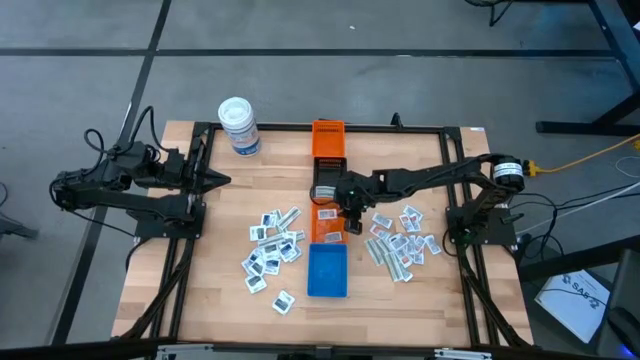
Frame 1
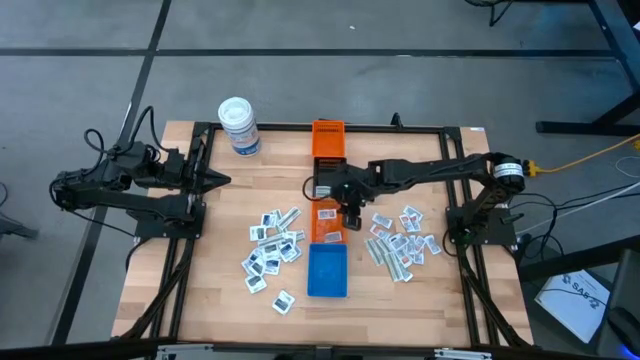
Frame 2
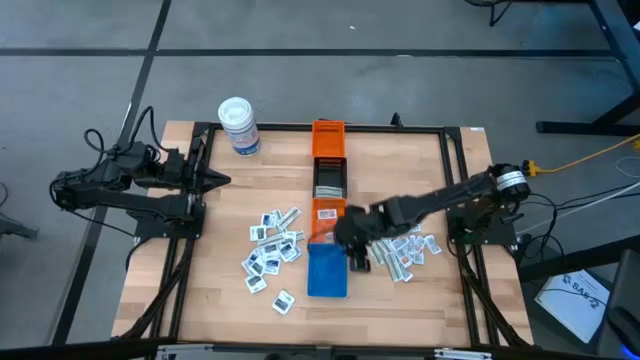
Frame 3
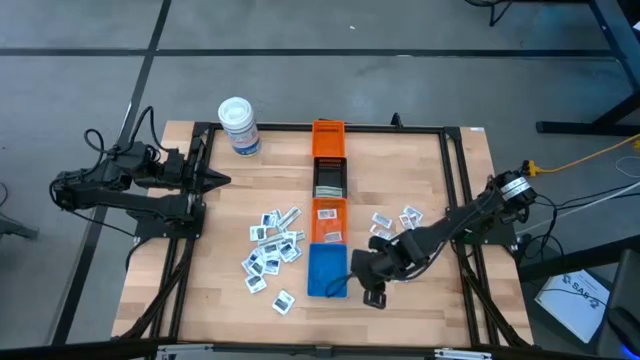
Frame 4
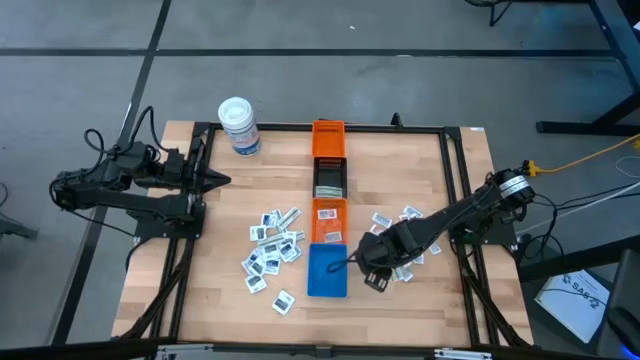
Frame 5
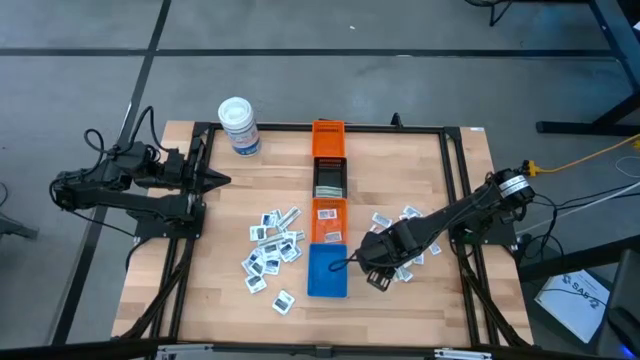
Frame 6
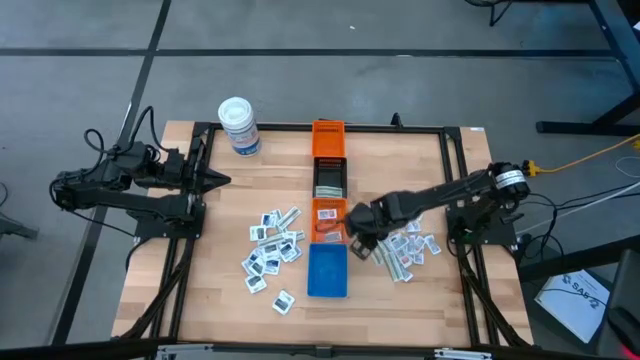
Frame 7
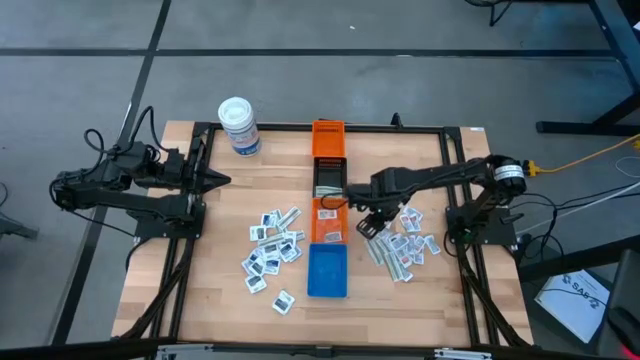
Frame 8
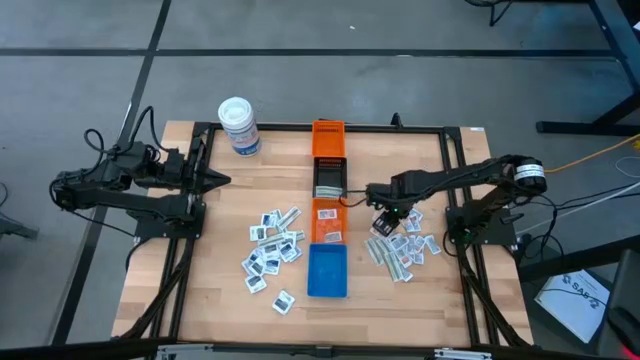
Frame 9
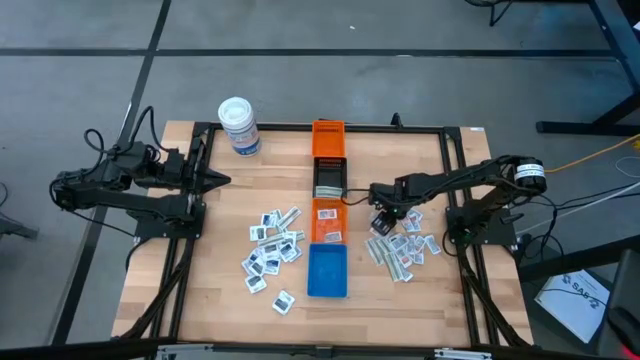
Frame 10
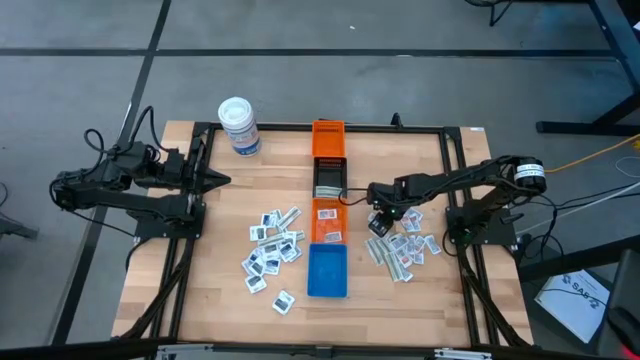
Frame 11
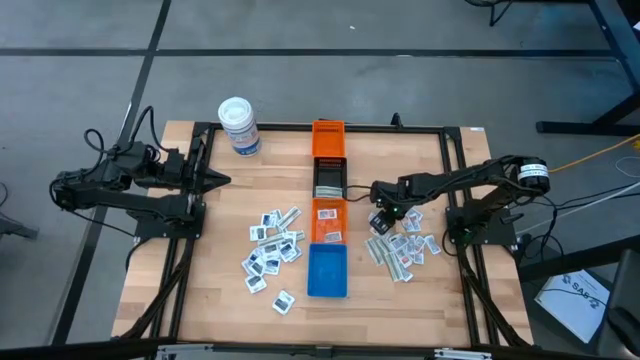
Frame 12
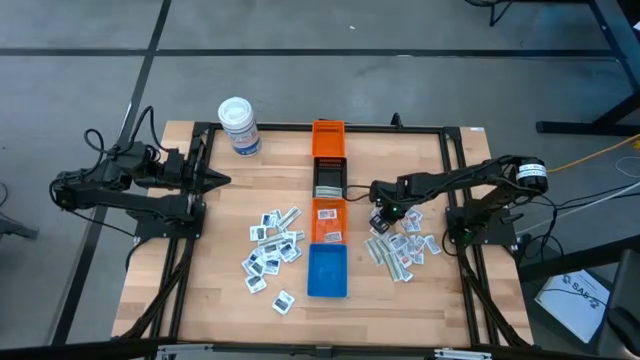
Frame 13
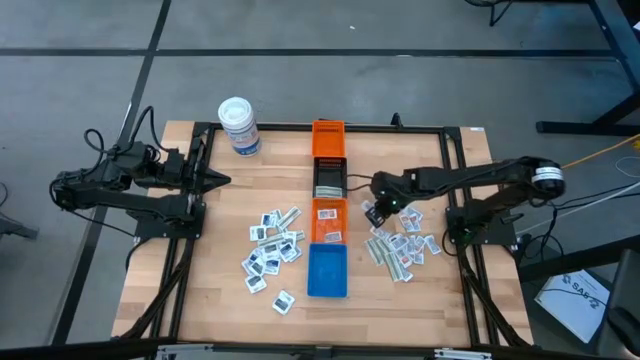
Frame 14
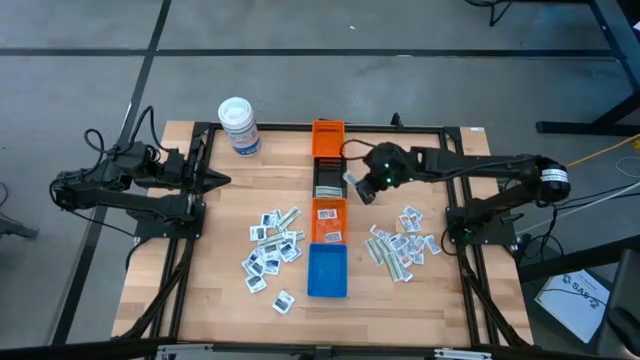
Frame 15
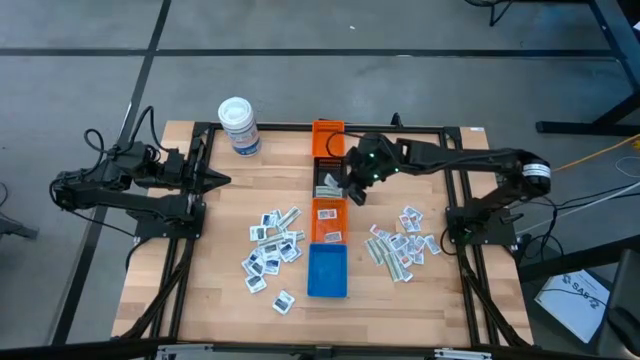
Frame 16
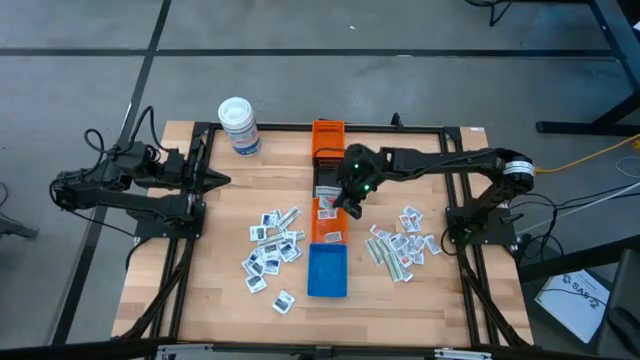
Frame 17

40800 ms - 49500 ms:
Task: Pick & Place First Aid Supplies
Put the orange ointment pack into the bottom orange bin

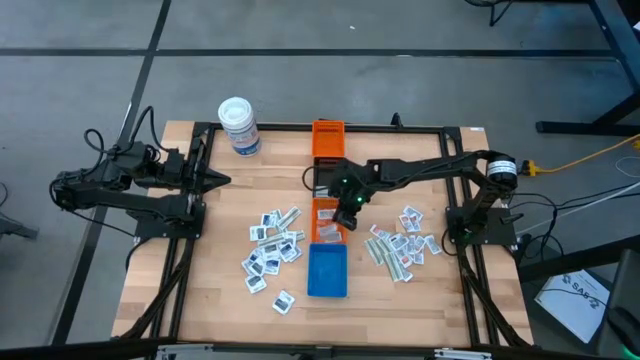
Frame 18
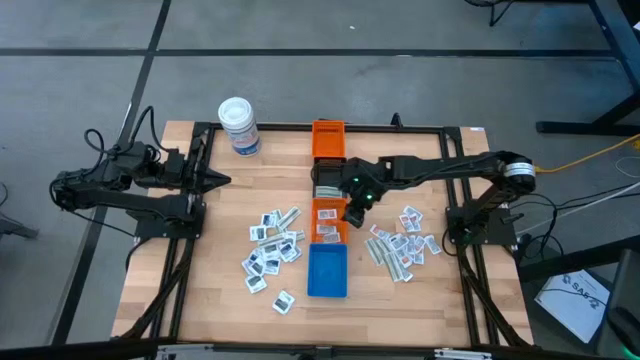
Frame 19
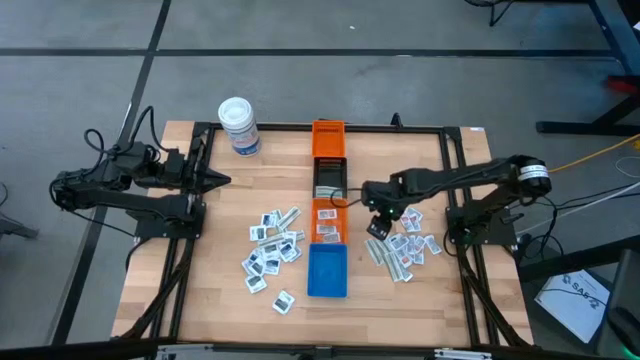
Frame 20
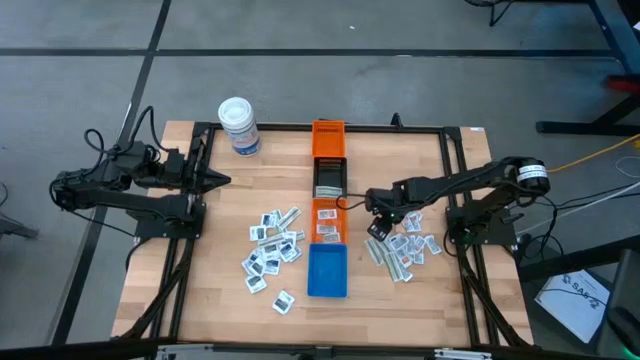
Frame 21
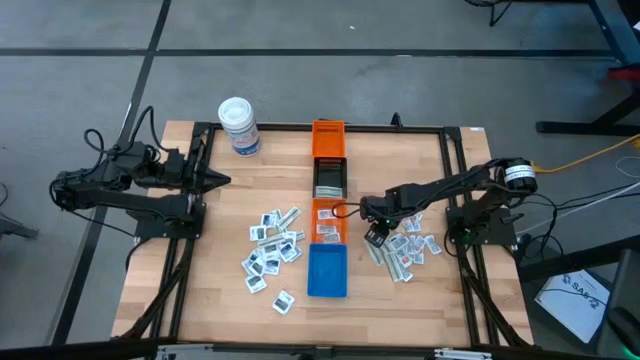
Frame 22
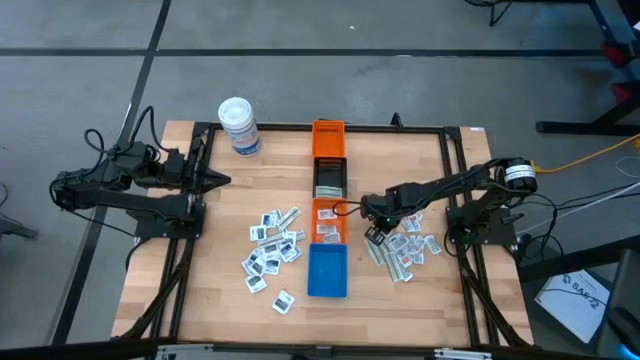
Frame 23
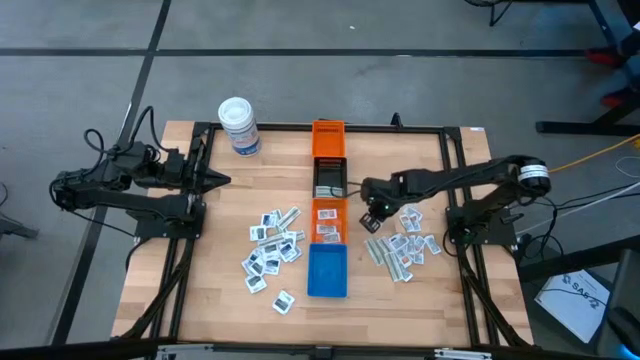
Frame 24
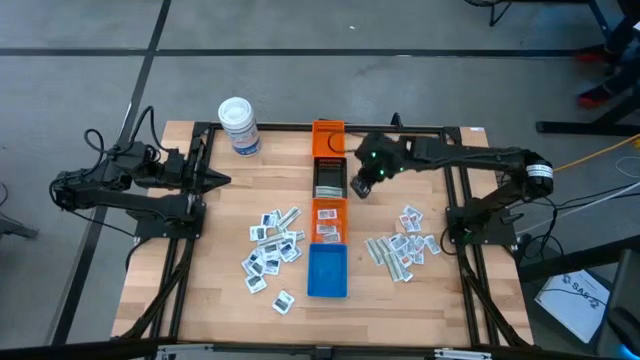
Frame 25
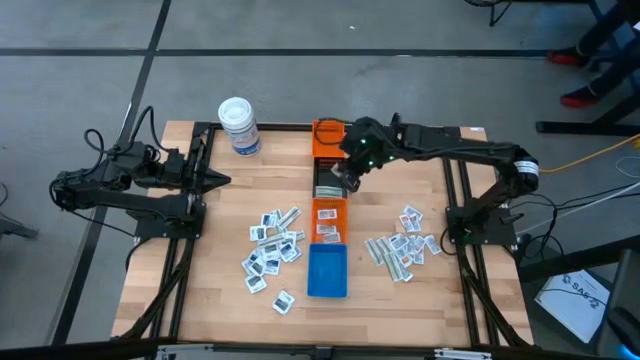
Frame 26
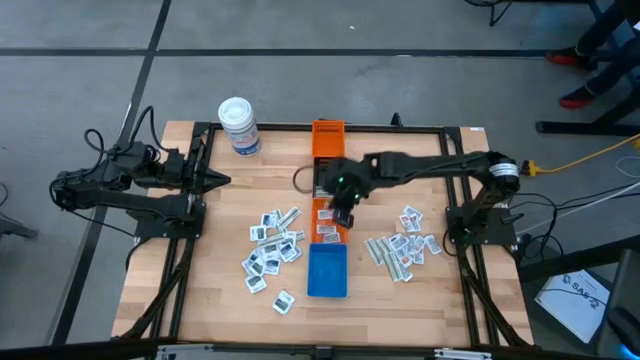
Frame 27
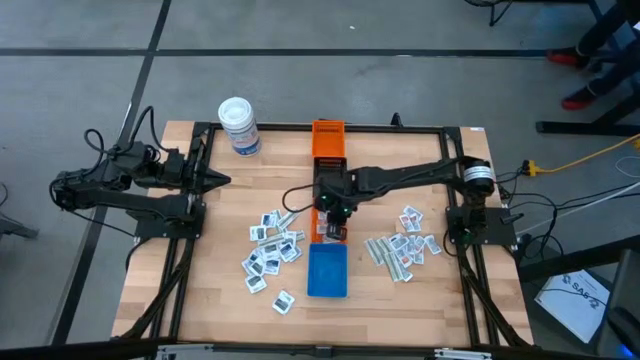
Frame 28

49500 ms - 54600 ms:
Put the orange ointment pack into the bottom orange bin

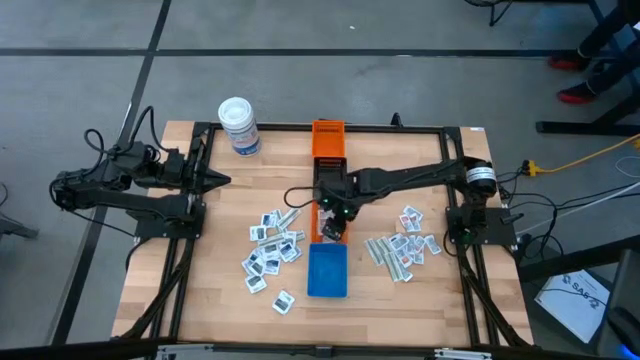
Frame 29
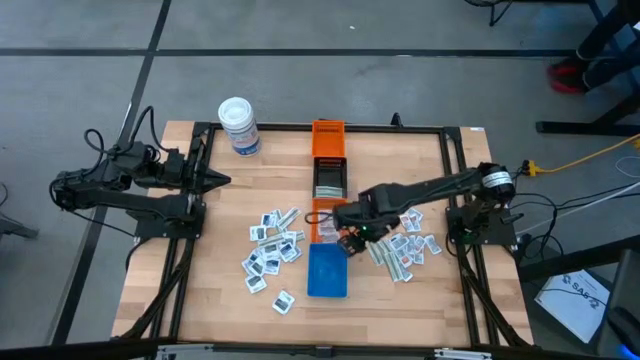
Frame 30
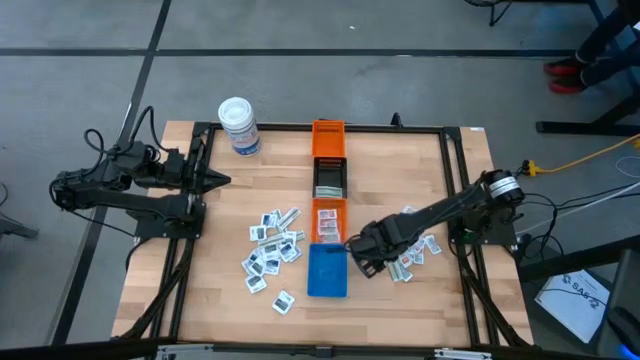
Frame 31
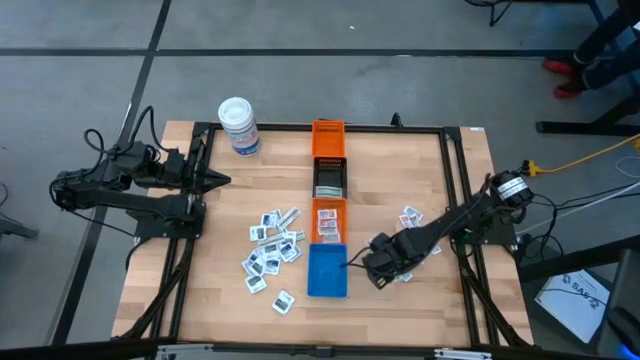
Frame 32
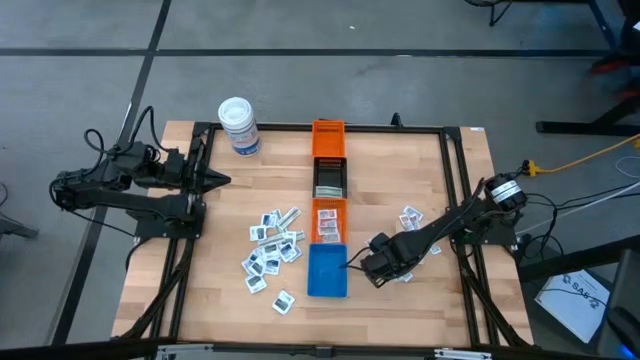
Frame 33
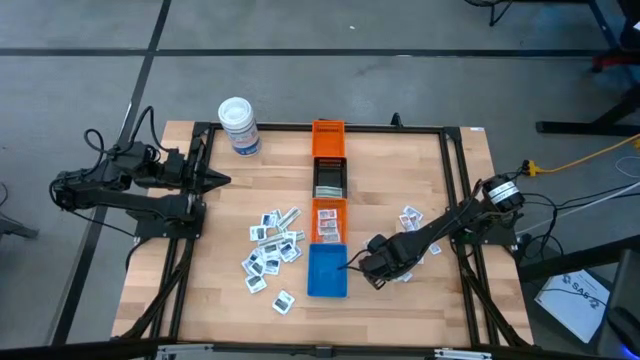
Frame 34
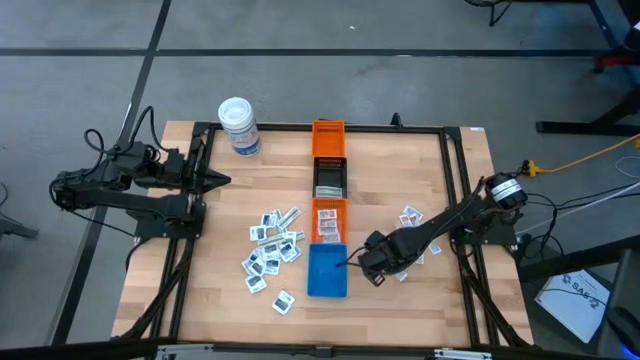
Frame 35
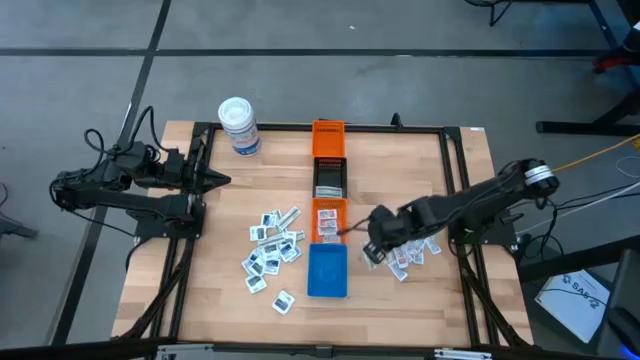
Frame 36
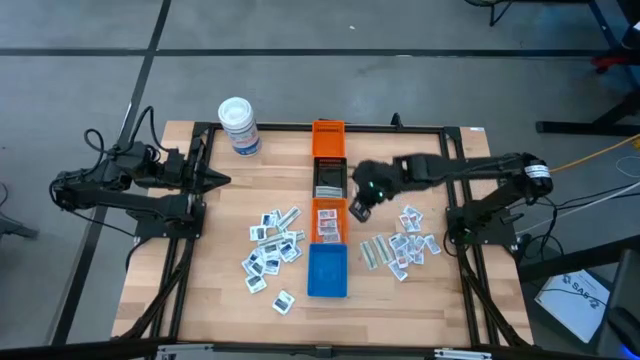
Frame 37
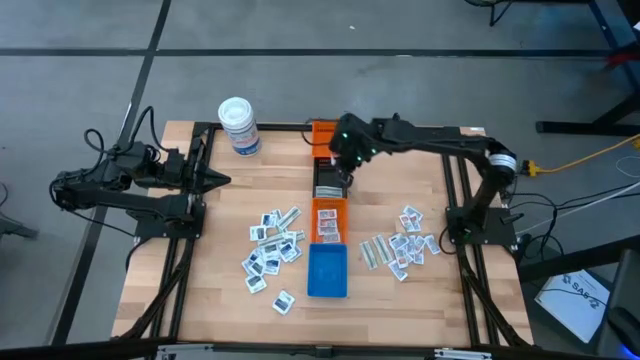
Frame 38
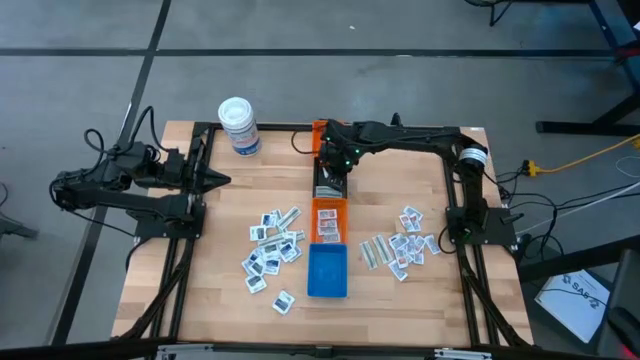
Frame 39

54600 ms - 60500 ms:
Put the green bandage into the black bin

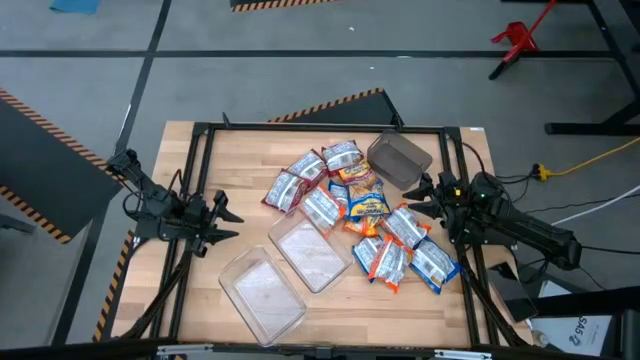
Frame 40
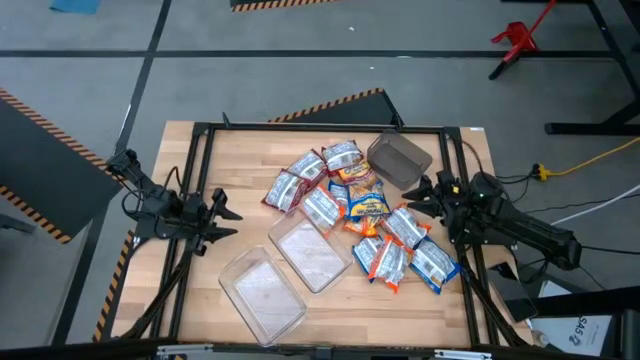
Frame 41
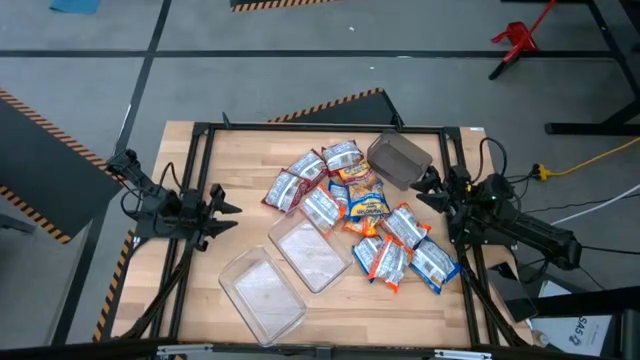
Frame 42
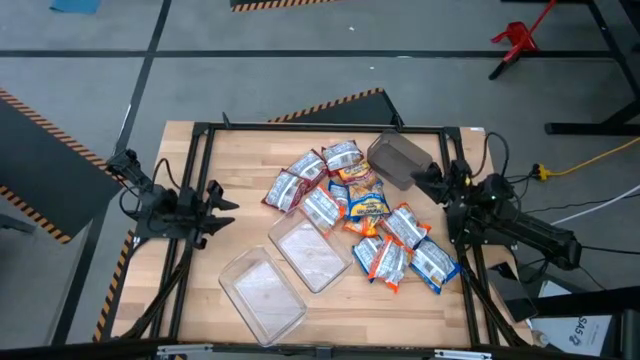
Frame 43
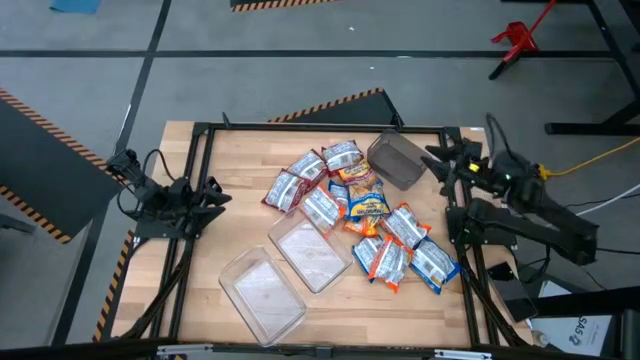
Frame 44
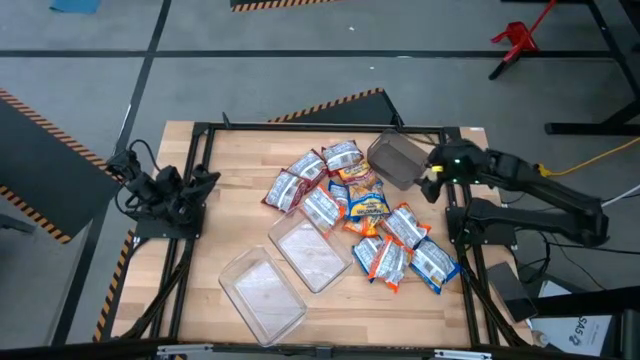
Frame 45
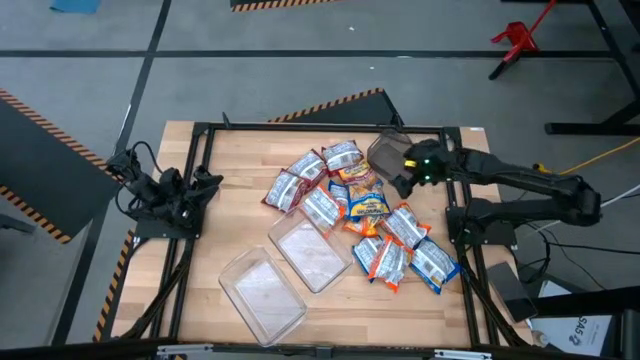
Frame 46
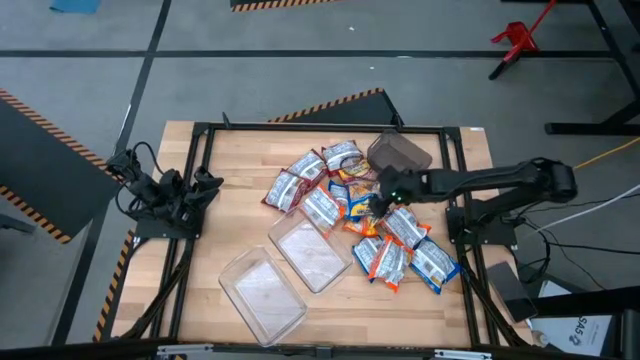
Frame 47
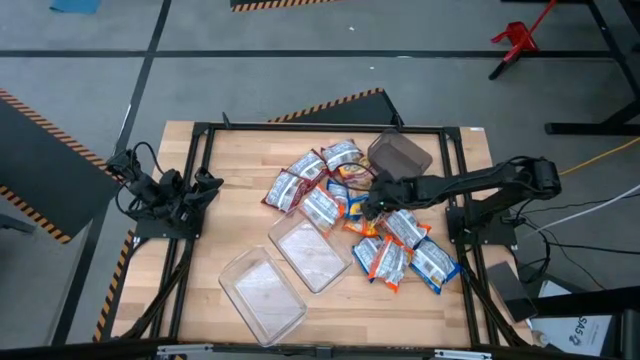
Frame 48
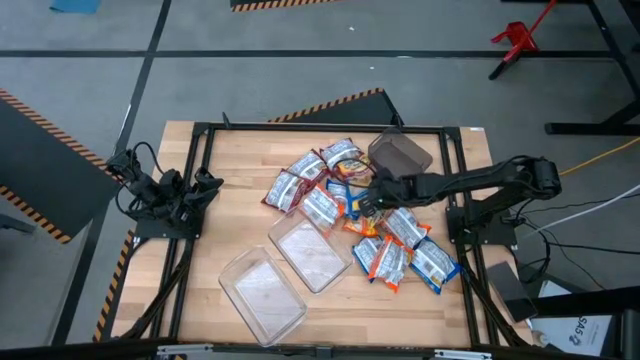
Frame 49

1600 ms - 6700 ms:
Task: Sort Maruchan noodles
Put the blue noodle pack into the black bin
